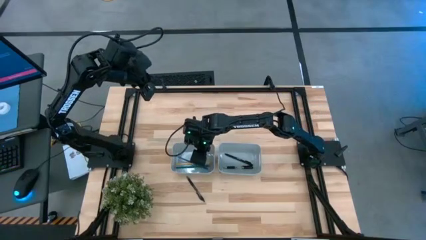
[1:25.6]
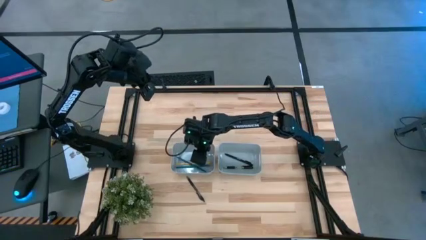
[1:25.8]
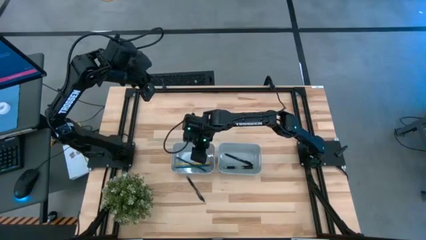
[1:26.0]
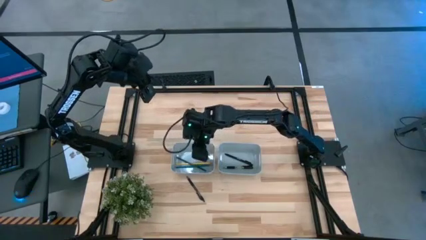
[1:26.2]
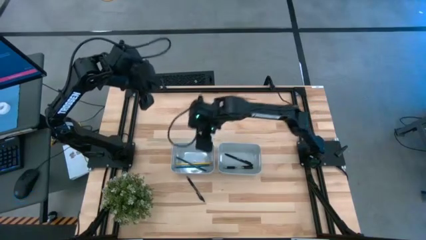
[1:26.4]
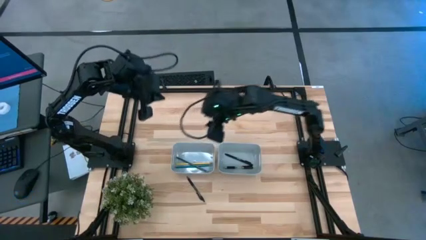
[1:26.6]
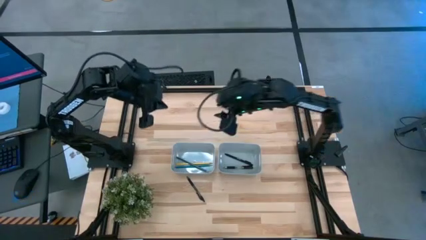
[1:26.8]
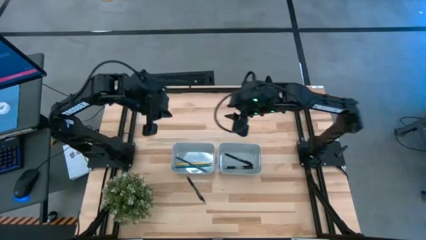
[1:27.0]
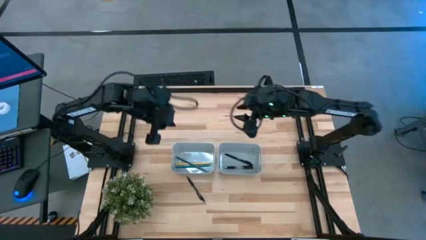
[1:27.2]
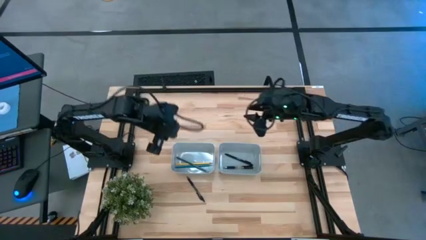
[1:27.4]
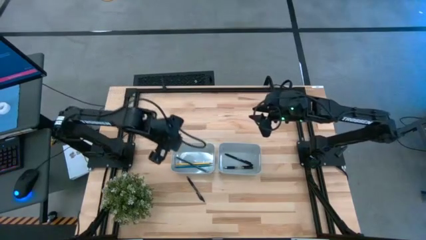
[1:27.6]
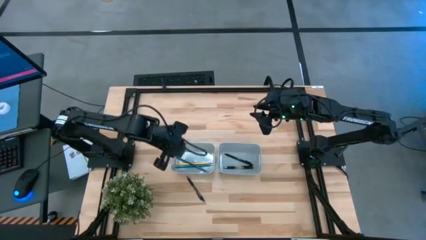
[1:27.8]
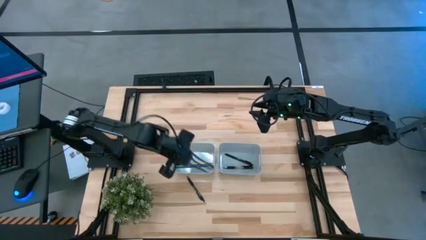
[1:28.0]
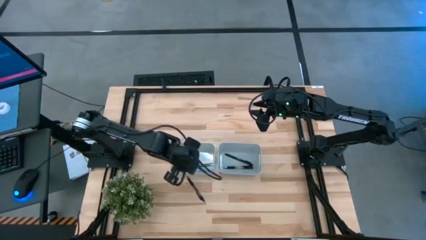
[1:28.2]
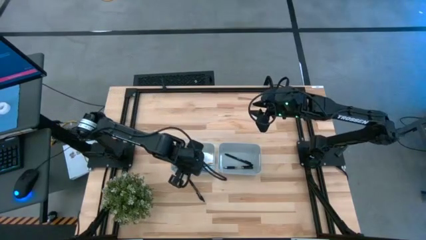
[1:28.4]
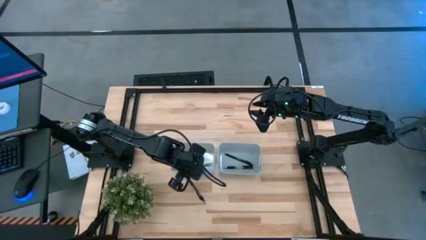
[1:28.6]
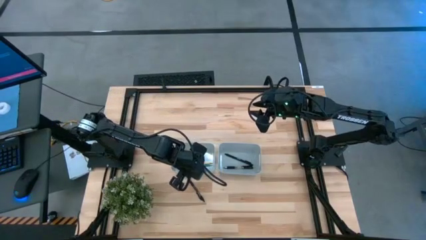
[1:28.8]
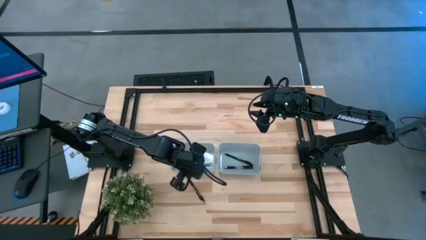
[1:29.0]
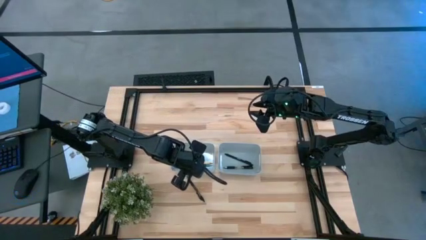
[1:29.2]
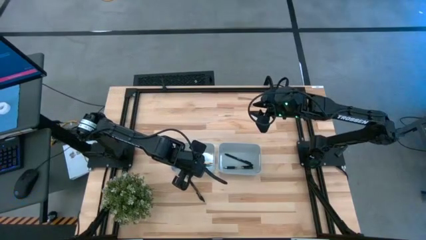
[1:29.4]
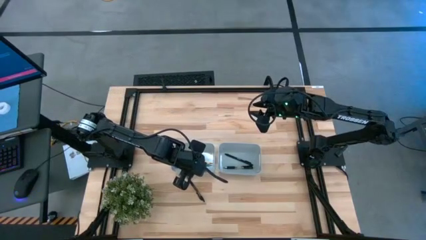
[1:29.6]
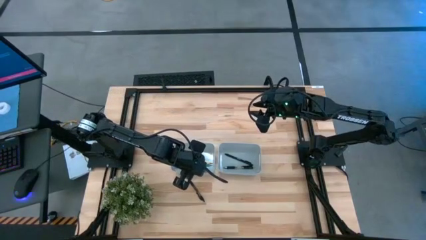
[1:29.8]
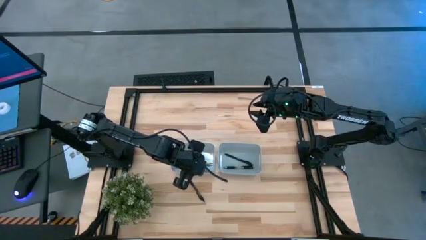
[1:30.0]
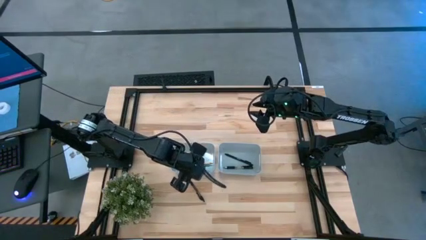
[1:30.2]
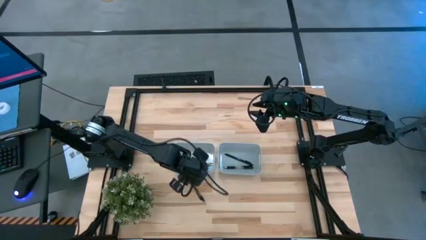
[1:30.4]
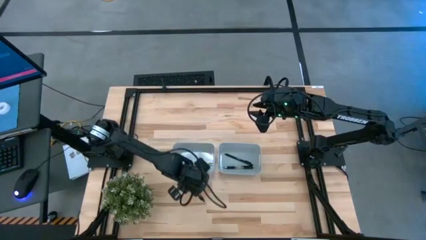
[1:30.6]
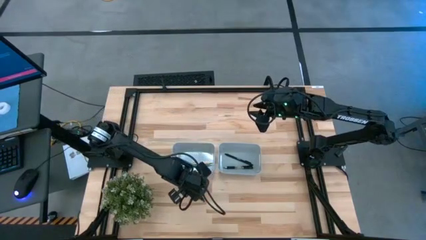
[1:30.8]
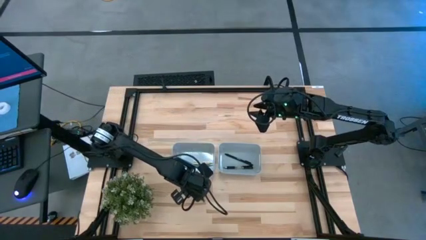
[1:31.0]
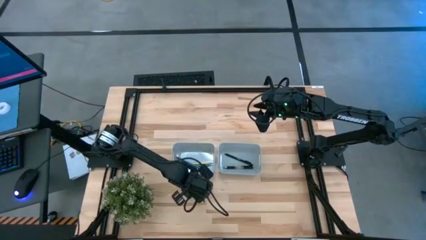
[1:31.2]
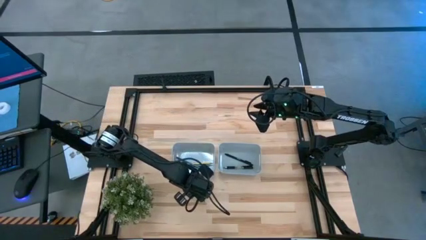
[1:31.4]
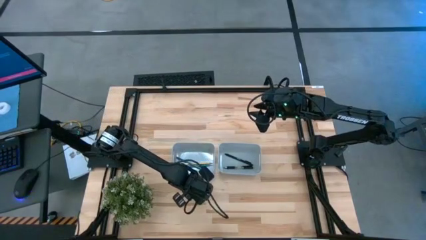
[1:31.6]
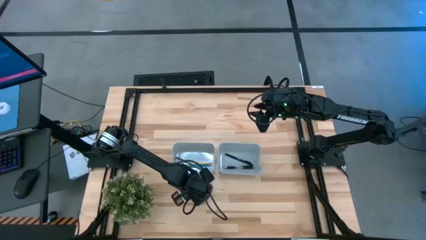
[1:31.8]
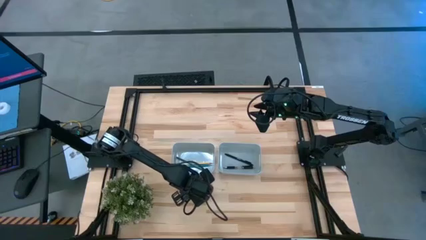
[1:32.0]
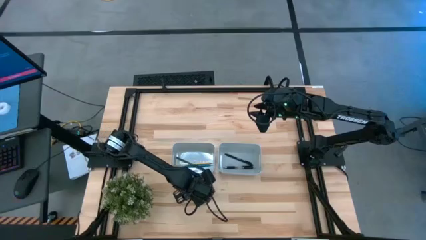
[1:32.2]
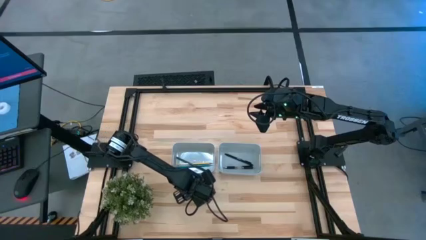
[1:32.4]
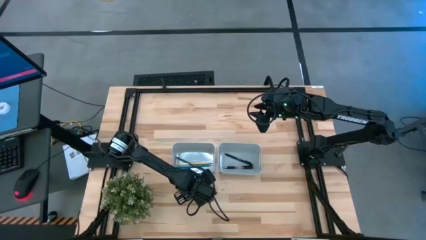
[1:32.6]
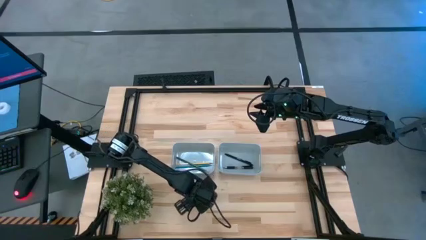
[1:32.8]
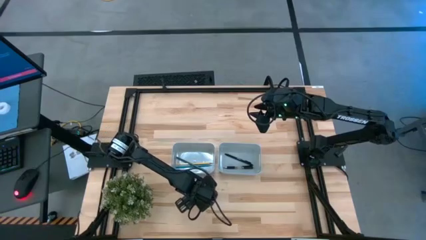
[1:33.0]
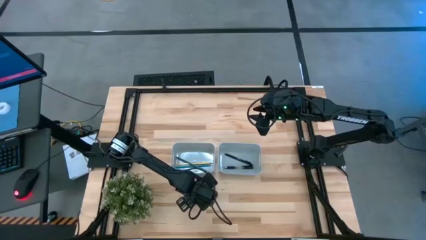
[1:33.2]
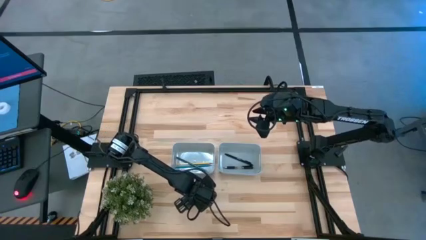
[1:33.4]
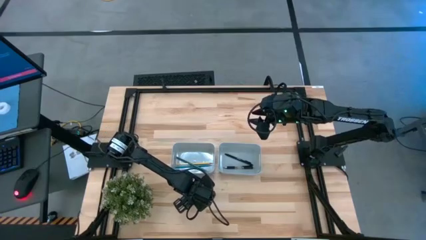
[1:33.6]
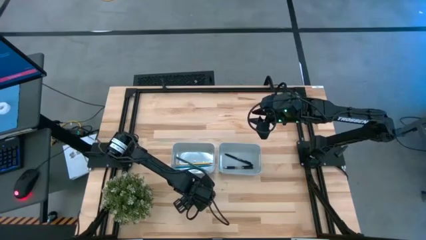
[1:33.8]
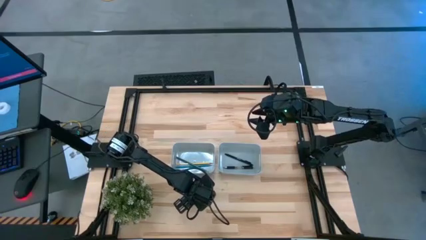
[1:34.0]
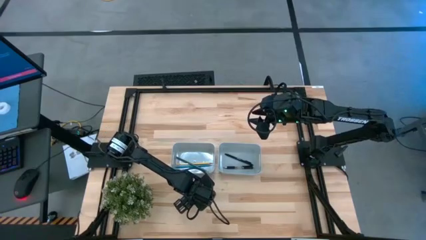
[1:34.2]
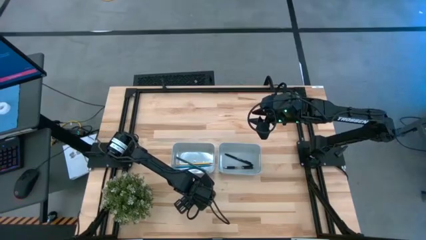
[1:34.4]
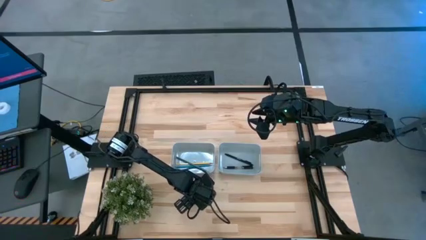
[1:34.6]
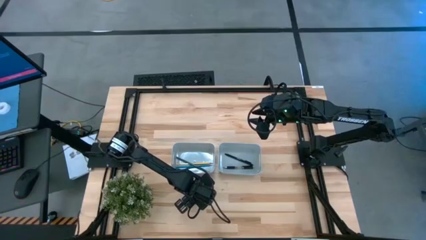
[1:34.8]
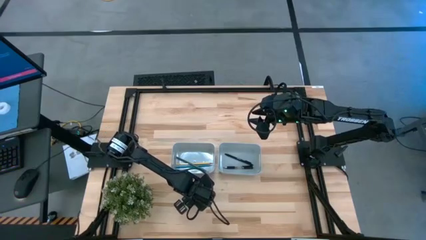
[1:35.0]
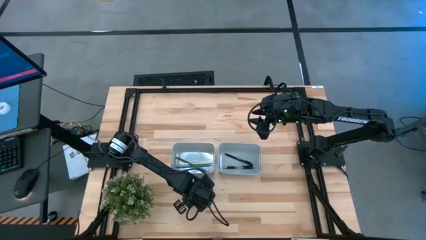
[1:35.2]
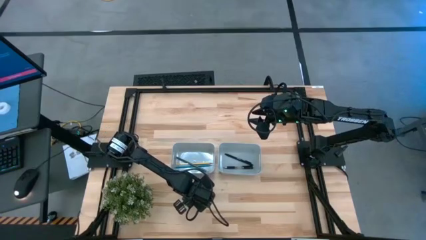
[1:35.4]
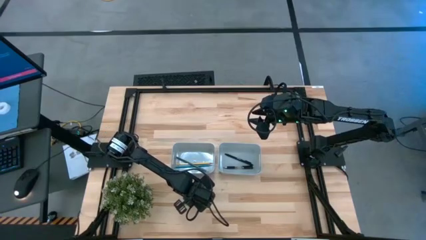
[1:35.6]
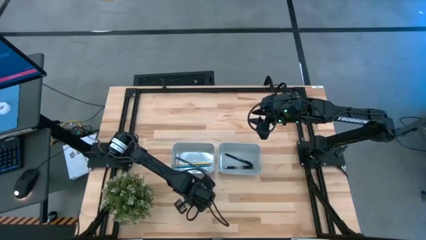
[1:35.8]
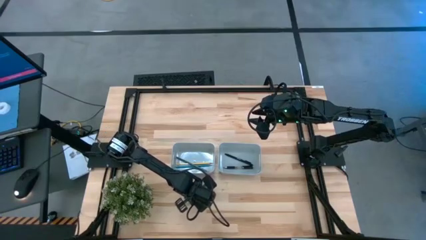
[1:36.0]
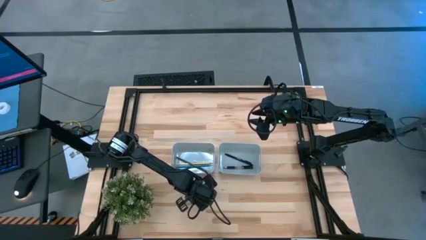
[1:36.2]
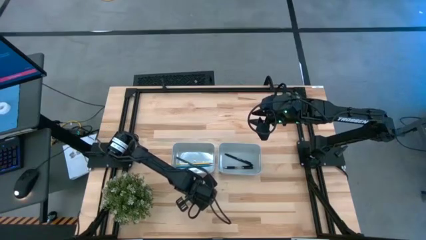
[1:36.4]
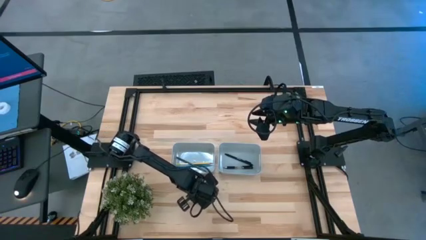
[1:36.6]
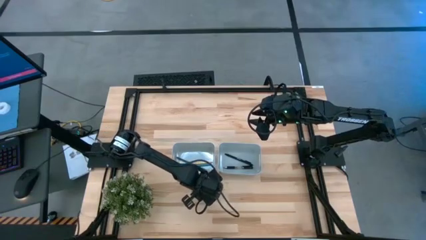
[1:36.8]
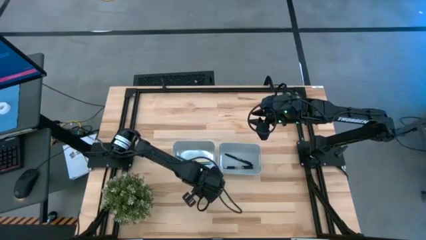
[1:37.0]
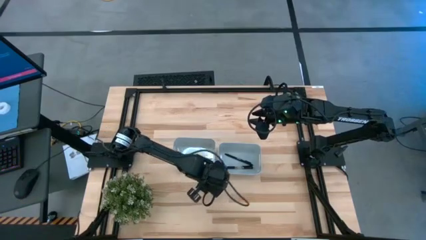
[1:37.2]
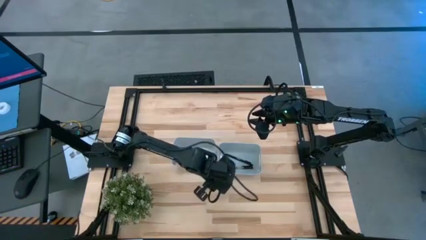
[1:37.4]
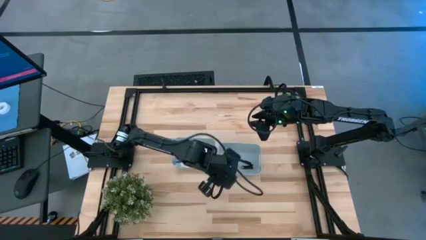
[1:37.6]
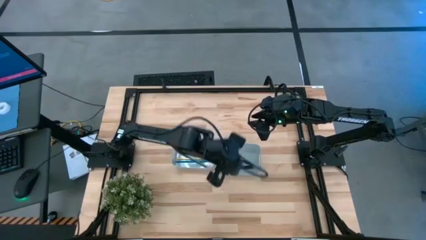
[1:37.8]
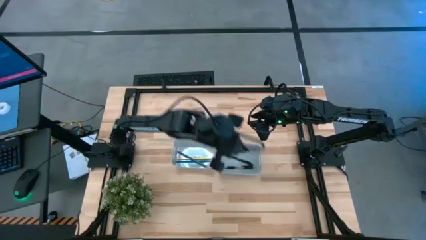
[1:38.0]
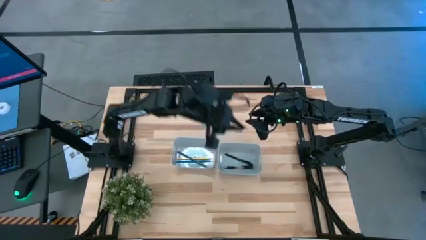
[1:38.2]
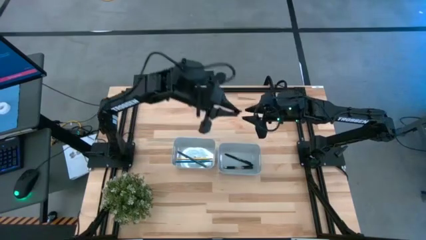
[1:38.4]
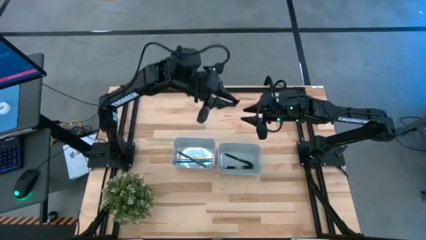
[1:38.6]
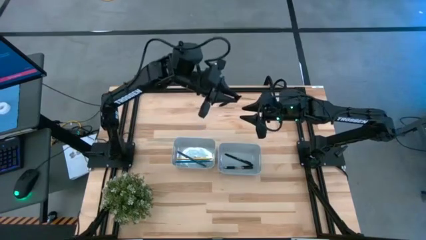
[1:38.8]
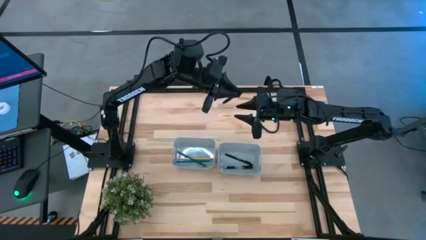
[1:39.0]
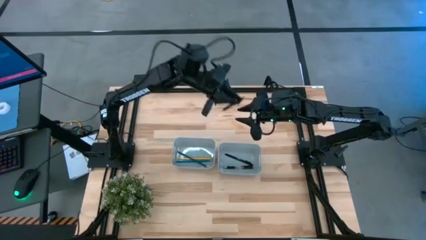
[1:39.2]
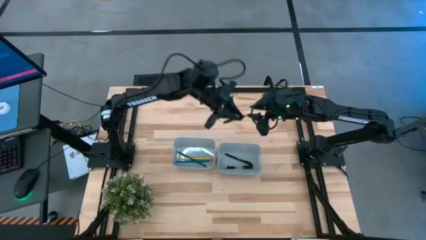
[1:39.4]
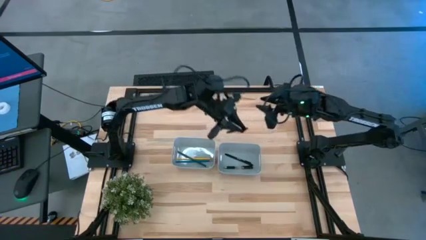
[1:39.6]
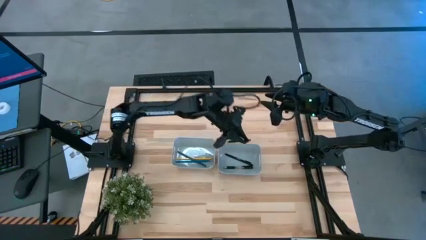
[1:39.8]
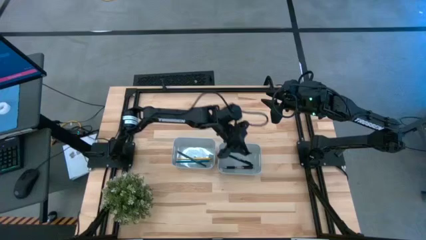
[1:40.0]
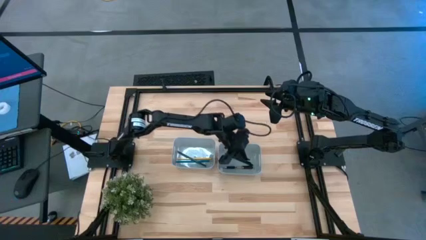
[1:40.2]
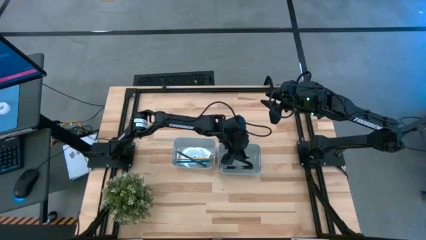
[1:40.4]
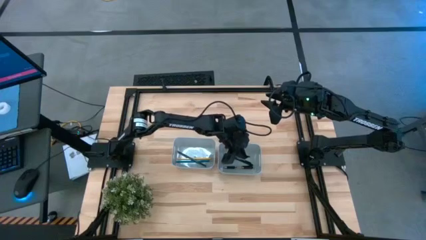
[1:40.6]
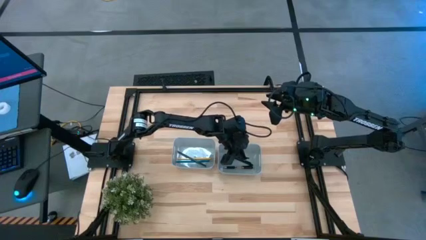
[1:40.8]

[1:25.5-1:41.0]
Task: Sort pens & pencils
Put the black pen into the right gray bin
